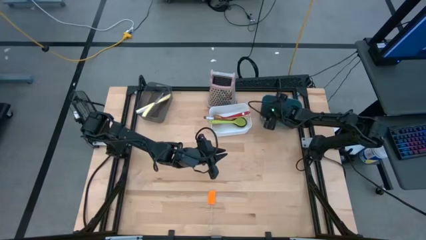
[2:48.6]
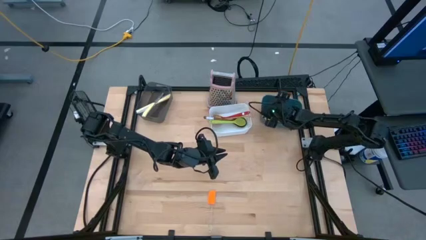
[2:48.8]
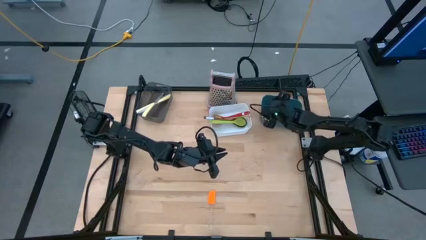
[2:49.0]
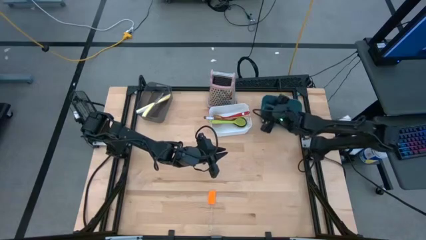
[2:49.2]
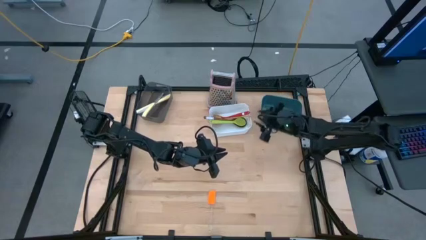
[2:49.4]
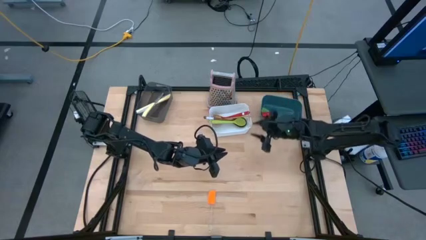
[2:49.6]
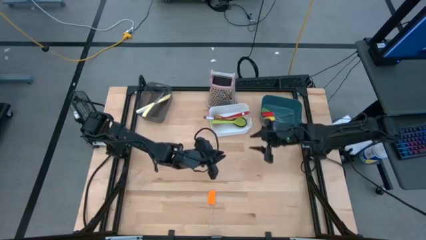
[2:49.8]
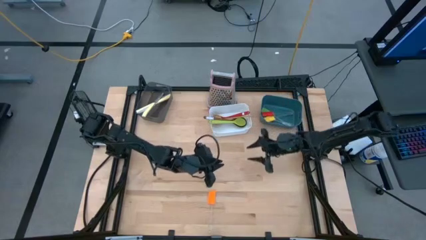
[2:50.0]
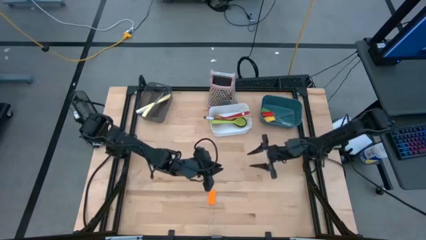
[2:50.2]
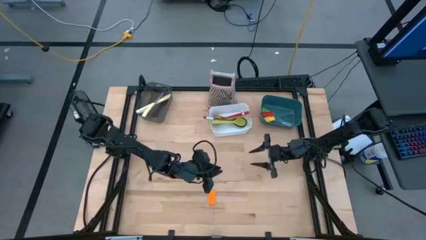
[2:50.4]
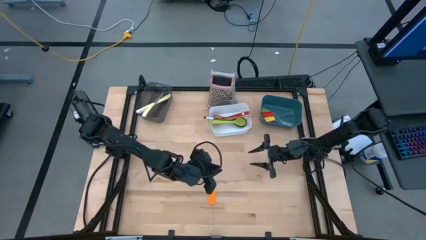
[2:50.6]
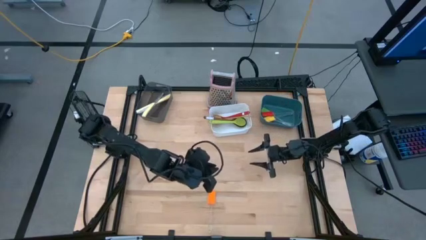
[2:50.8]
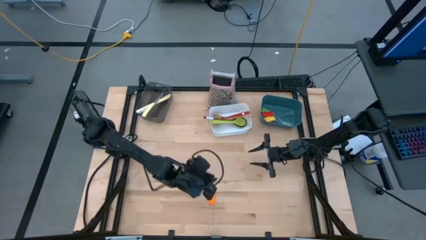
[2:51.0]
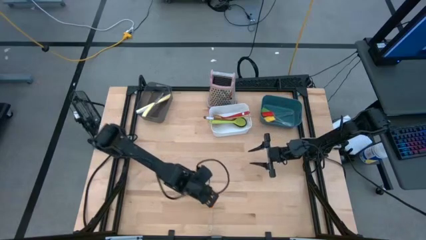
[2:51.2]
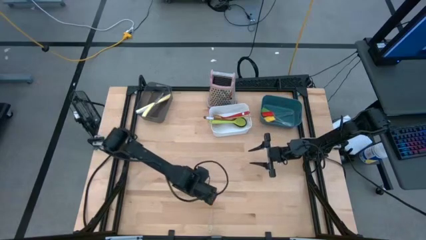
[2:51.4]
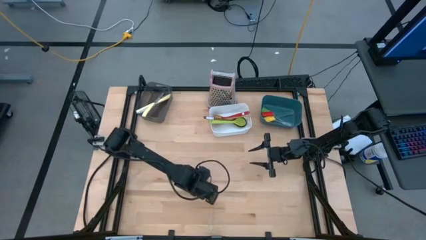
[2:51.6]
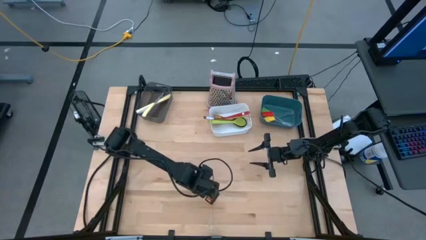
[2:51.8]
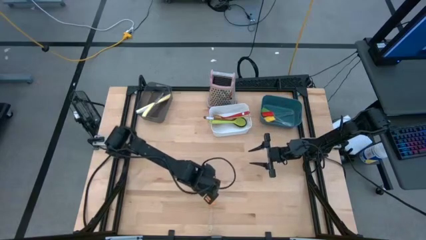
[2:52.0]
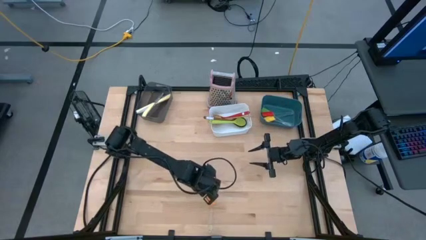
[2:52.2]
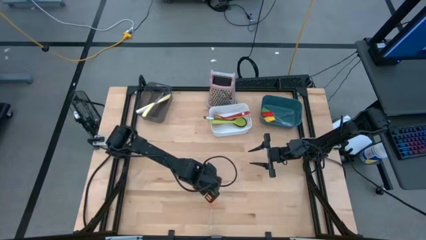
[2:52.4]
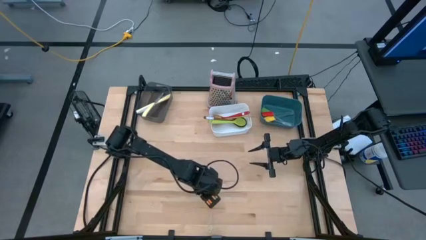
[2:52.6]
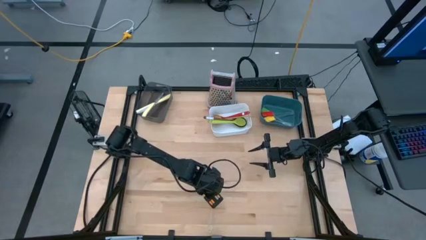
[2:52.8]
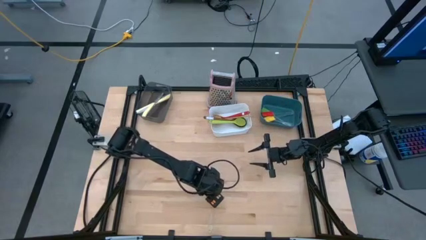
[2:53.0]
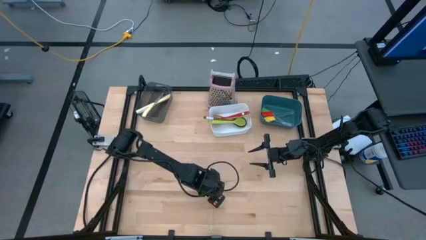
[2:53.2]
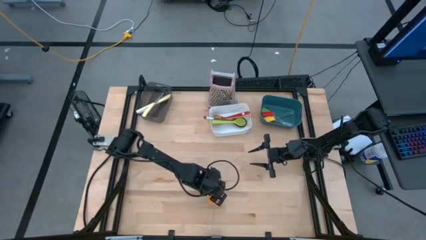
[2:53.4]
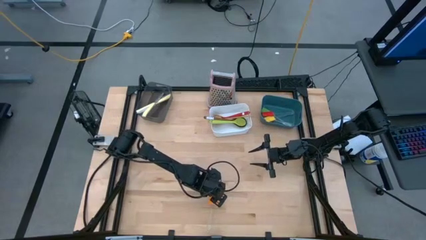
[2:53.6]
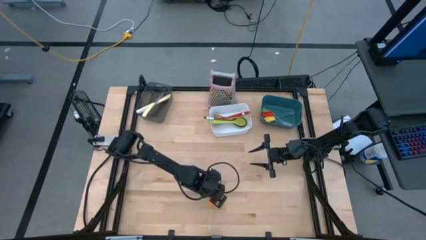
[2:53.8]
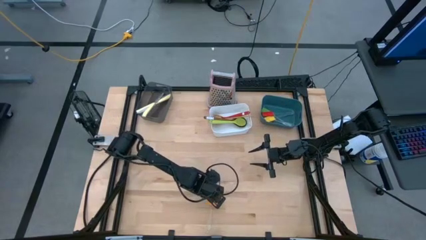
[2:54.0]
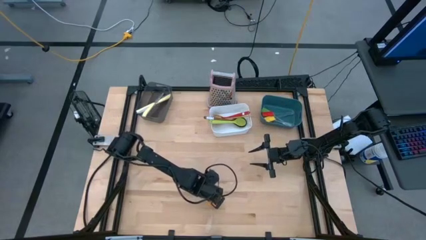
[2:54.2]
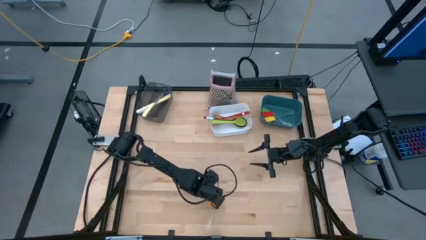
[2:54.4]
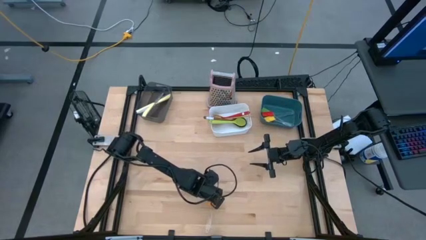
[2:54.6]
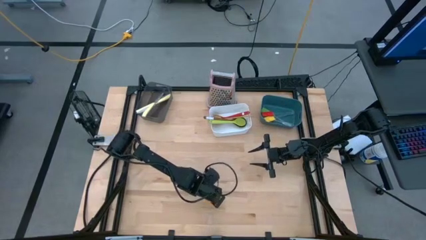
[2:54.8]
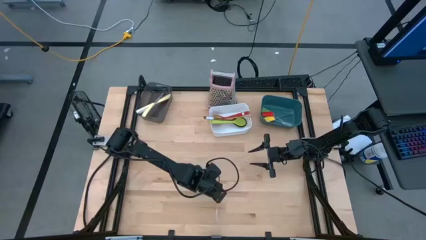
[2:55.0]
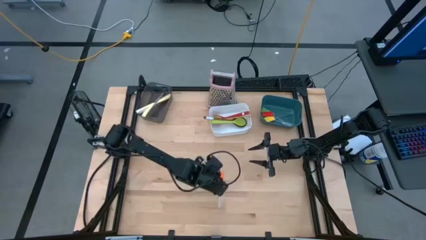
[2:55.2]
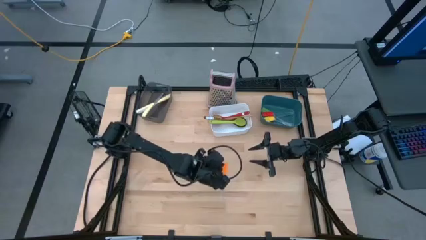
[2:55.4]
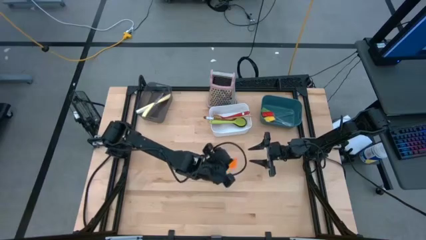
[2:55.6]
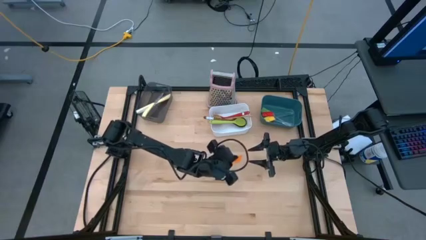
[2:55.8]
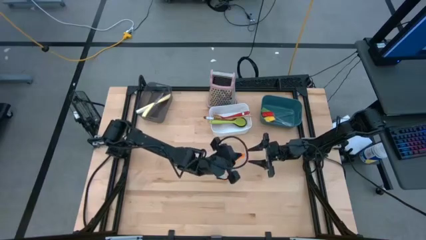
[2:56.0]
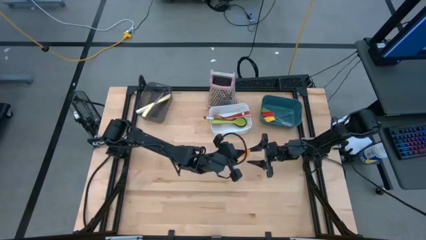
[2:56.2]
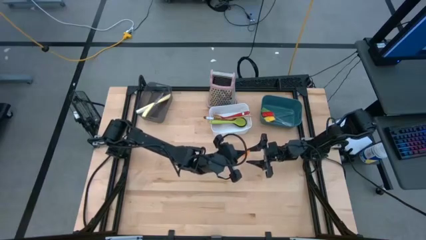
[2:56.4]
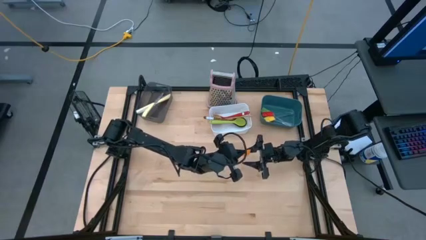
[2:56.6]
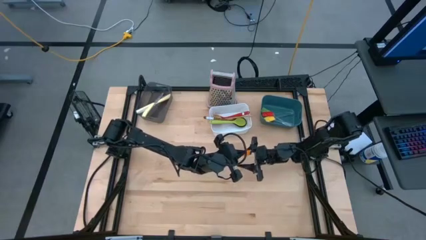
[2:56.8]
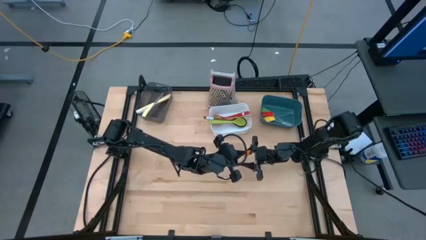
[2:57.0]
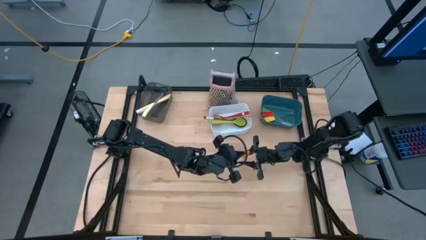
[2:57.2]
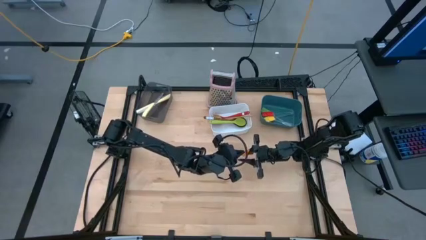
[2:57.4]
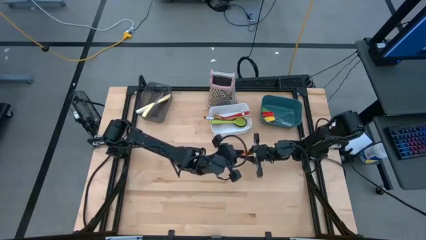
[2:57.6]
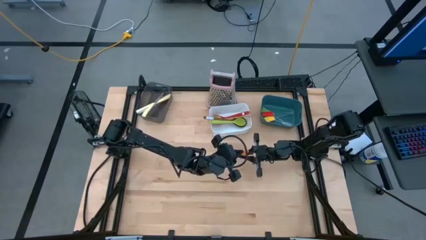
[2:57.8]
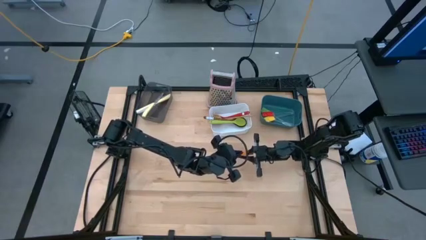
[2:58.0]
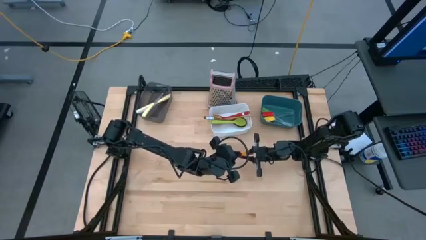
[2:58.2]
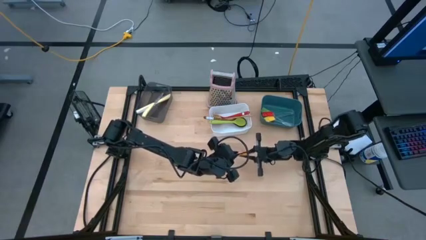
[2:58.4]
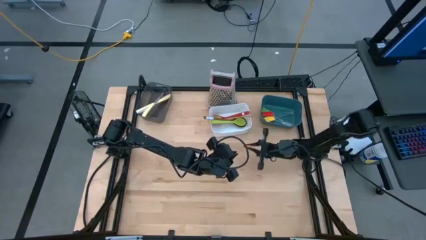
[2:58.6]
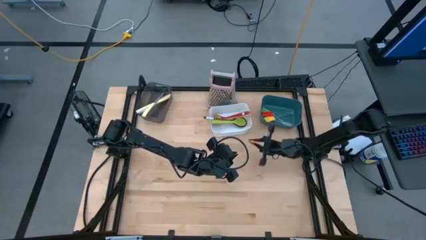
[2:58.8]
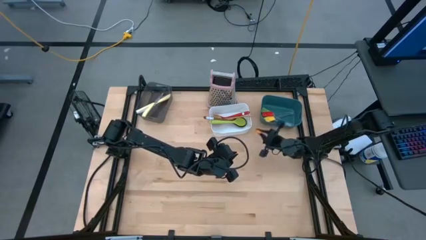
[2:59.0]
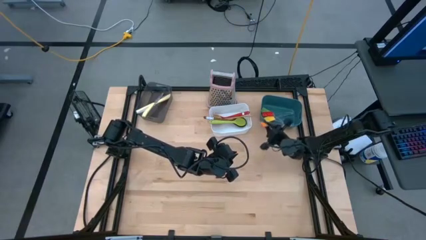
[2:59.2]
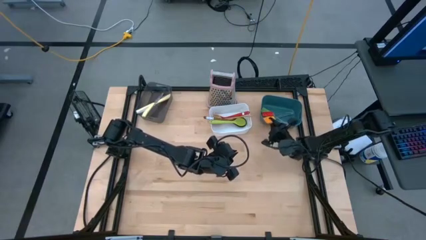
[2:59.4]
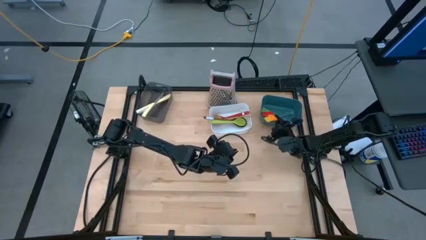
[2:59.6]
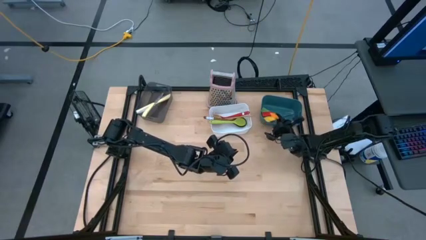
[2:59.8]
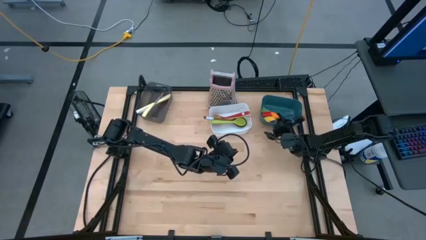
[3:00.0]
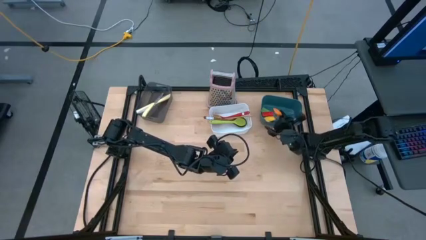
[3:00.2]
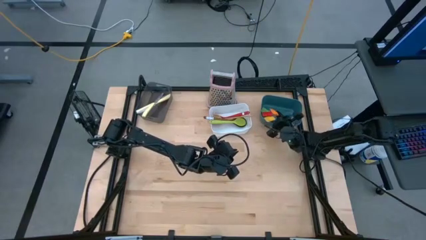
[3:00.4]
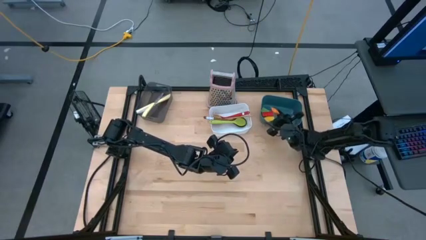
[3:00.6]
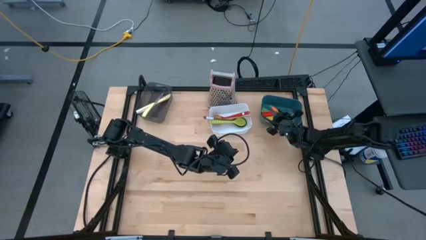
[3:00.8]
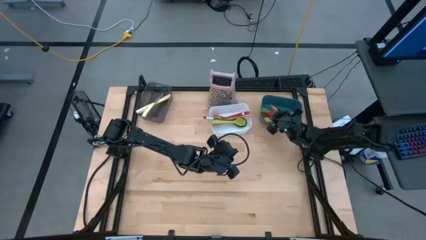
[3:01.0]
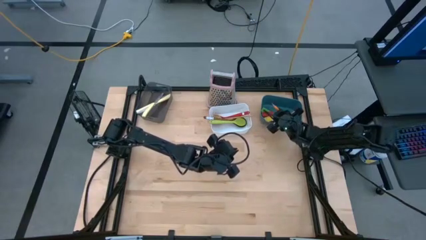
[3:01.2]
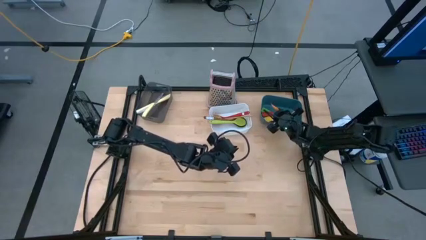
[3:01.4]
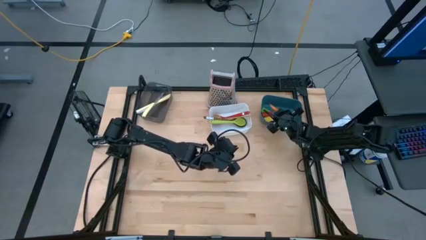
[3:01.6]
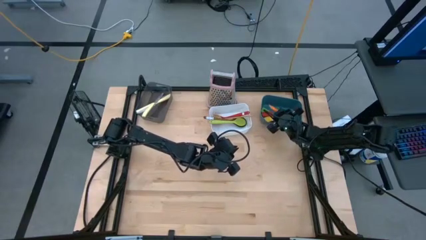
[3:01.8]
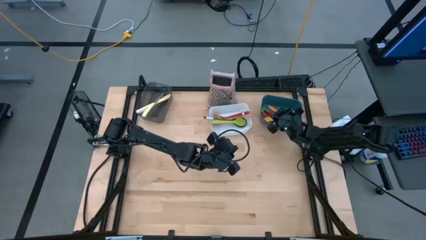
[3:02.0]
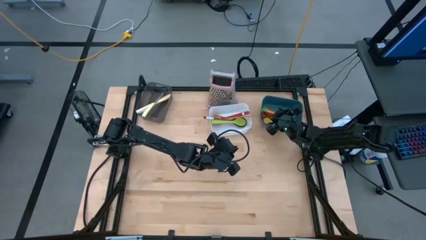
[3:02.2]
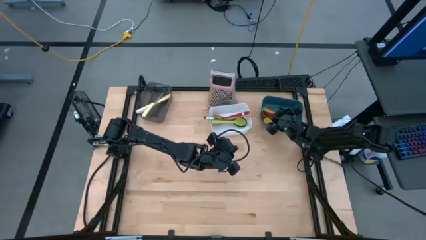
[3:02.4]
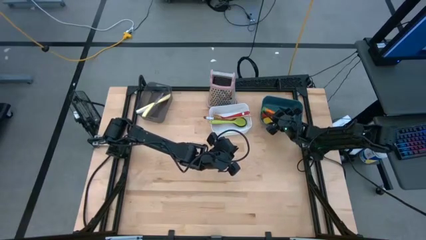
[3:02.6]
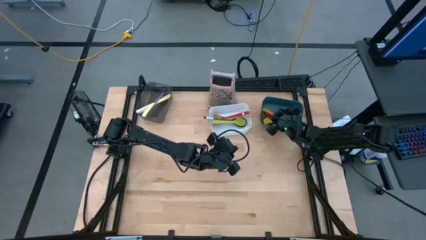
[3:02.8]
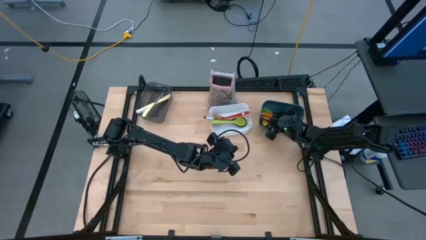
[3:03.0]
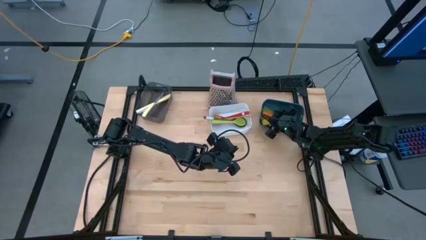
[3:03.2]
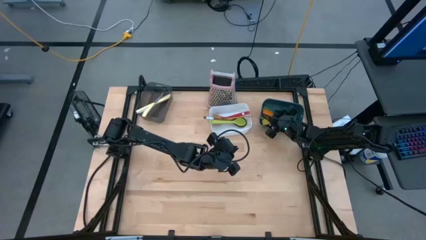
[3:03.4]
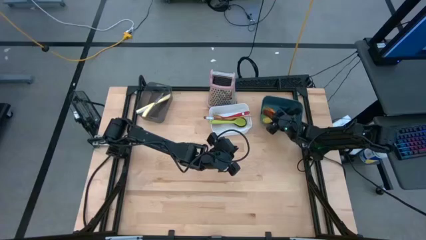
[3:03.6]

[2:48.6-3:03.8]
Task: Pick & Place Kitchen Items
Put the orange spatula into the blue bin

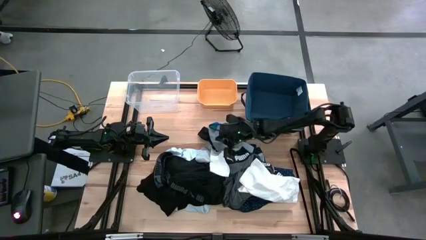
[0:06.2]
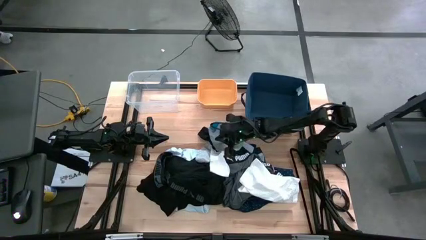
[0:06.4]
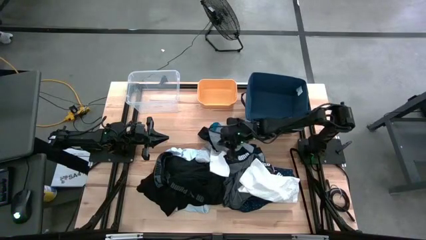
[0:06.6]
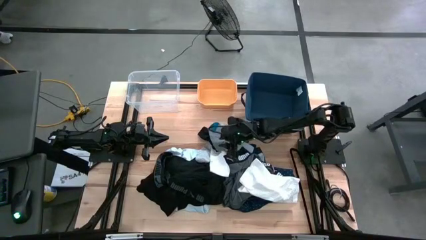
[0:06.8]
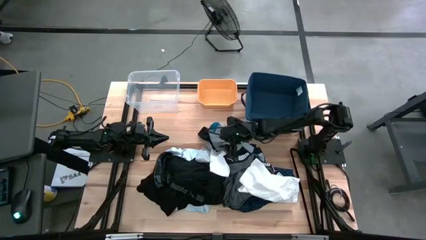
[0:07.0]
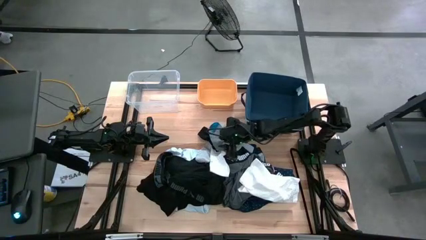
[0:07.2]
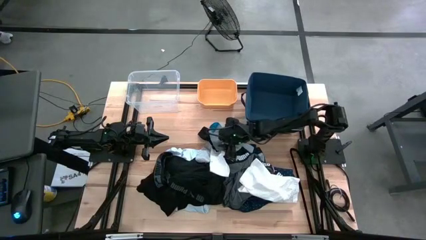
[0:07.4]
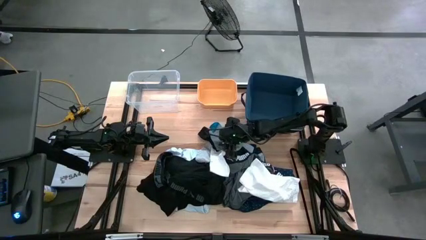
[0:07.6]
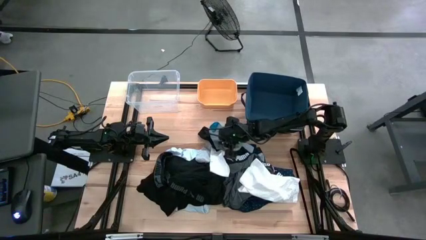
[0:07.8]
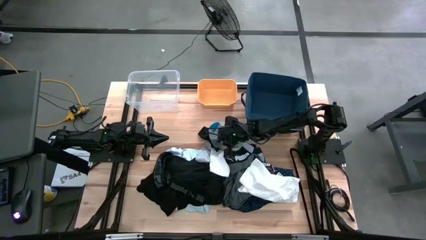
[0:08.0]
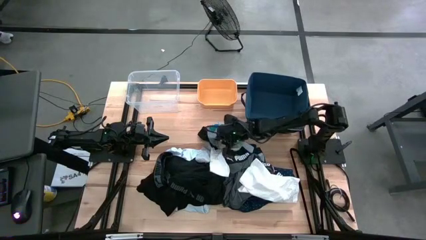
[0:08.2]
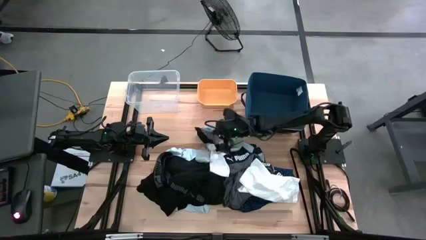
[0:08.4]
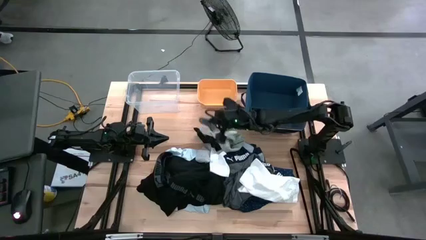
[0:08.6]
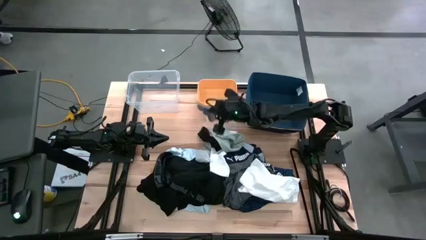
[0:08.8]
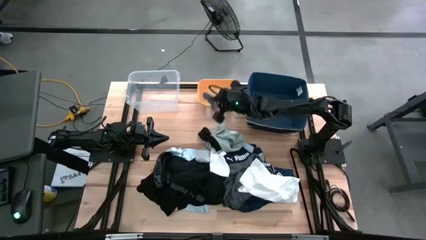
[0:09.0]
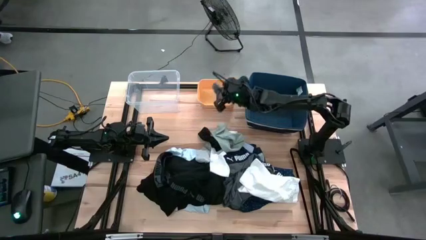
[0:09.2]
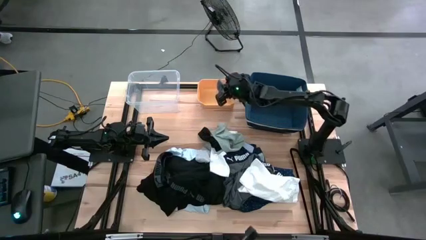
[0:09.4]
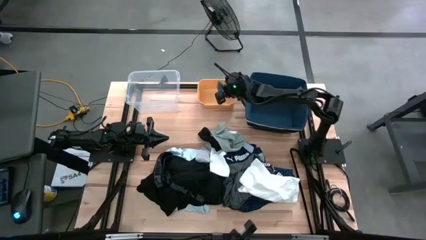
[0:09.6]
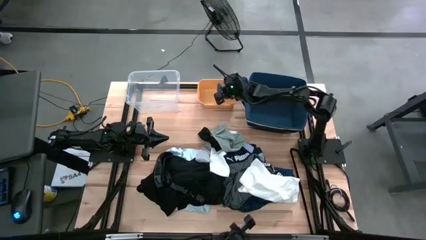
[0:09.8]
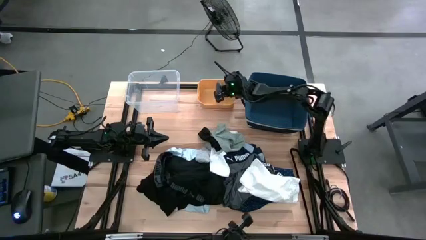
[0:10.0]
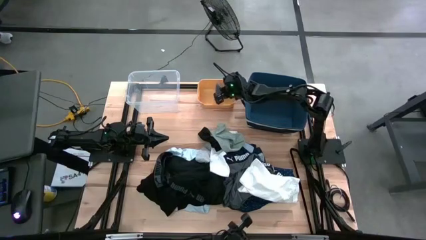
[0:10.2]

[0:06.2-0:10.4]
Task: Pick & Place Cloths
Put the gray sock into the yellow bin
